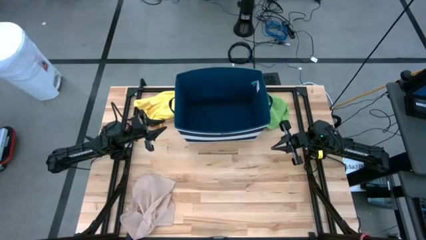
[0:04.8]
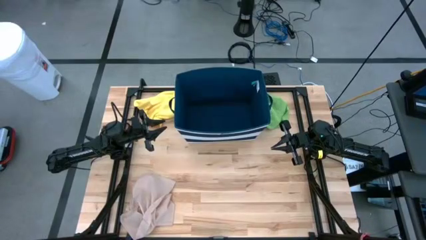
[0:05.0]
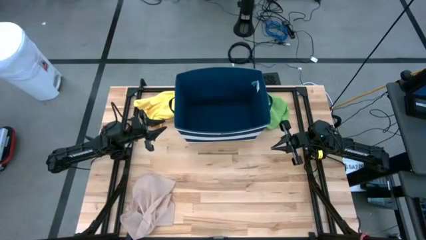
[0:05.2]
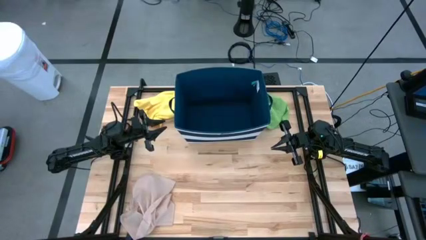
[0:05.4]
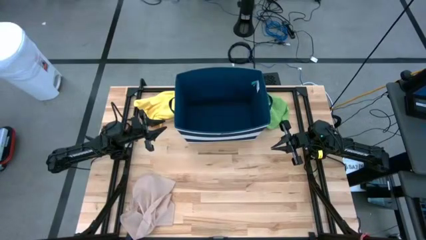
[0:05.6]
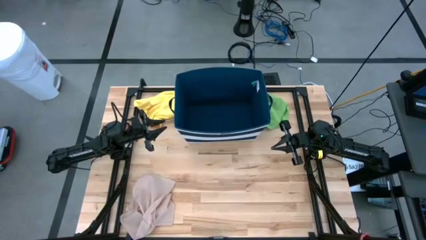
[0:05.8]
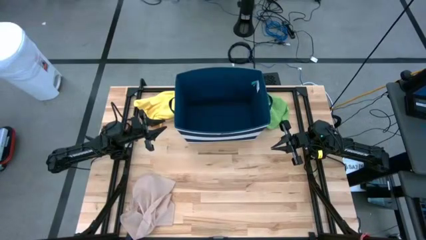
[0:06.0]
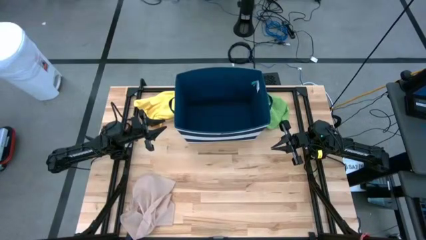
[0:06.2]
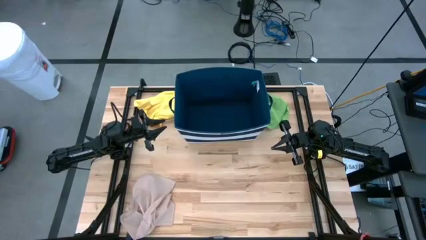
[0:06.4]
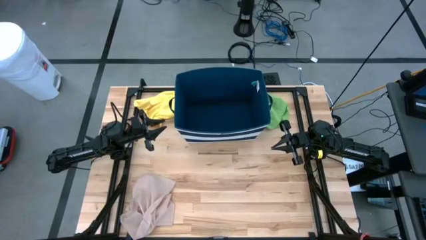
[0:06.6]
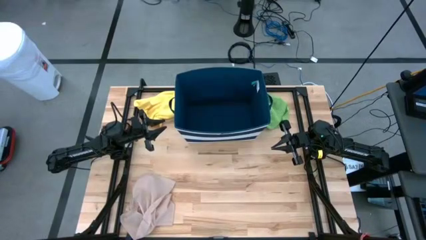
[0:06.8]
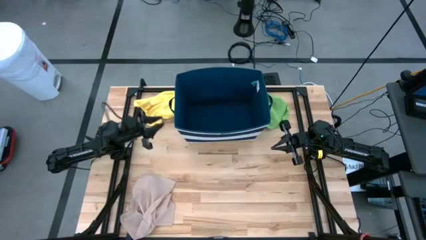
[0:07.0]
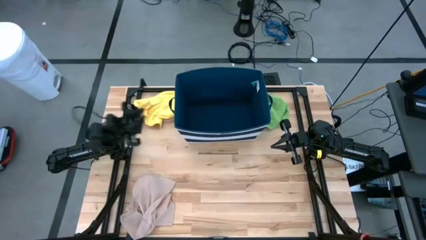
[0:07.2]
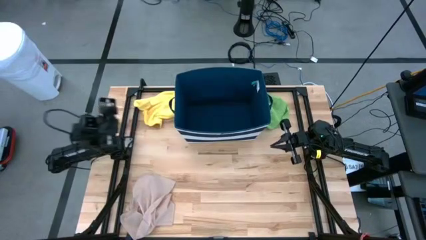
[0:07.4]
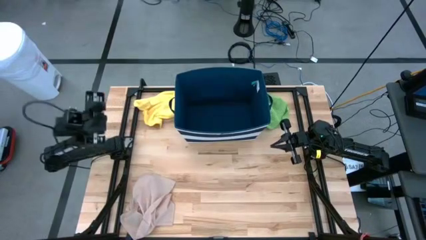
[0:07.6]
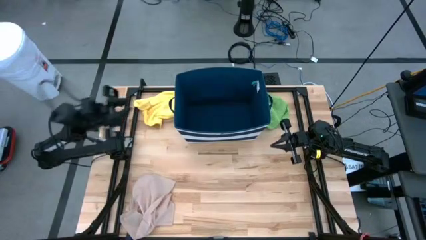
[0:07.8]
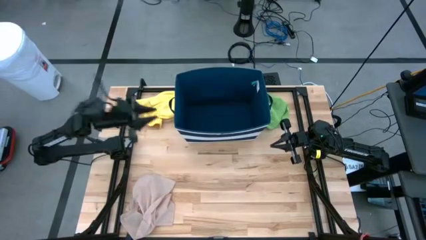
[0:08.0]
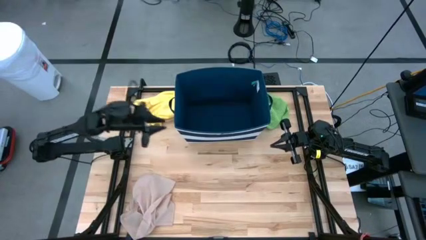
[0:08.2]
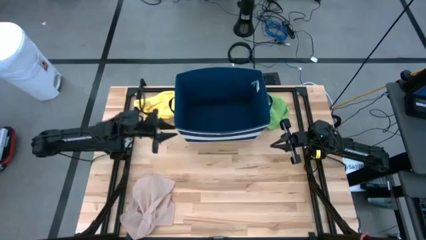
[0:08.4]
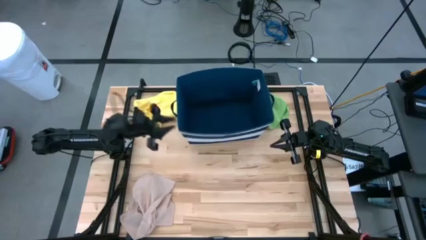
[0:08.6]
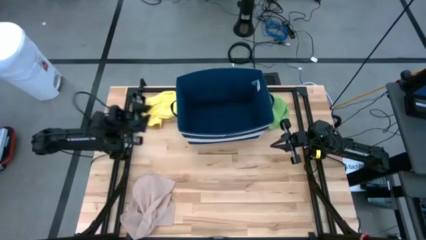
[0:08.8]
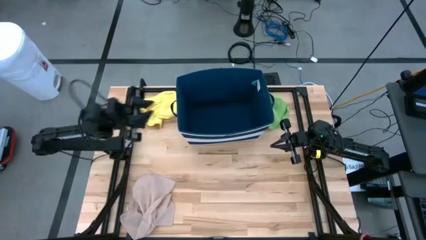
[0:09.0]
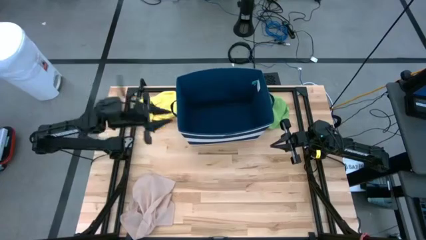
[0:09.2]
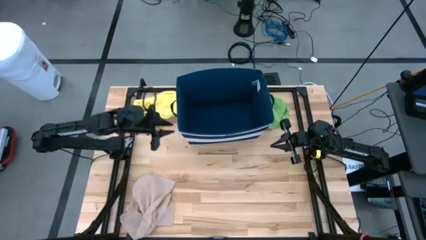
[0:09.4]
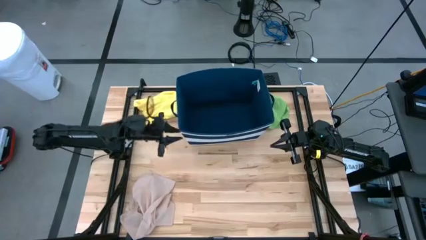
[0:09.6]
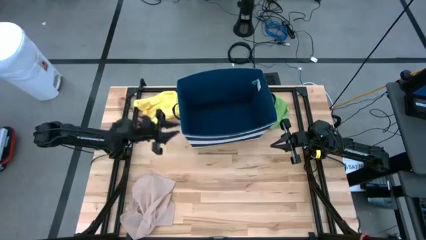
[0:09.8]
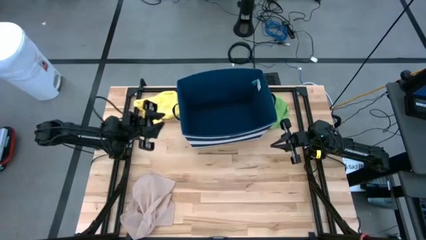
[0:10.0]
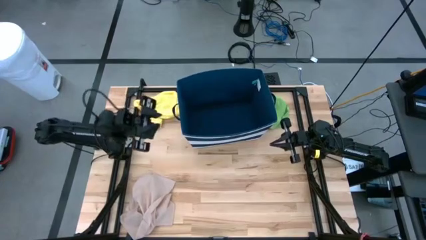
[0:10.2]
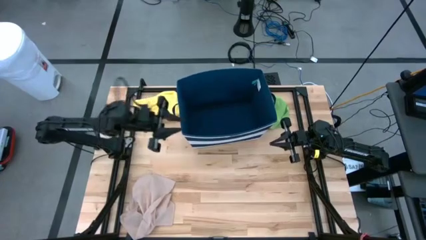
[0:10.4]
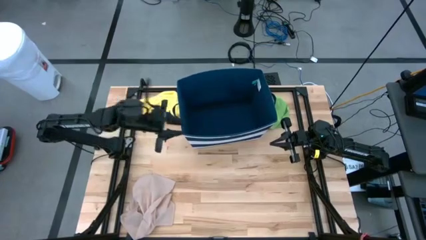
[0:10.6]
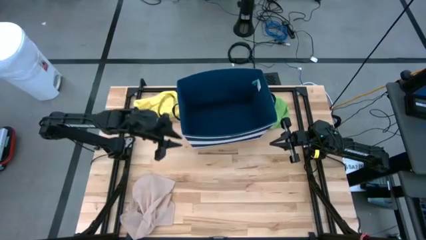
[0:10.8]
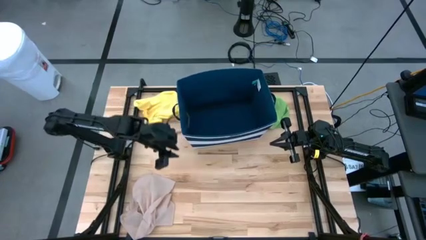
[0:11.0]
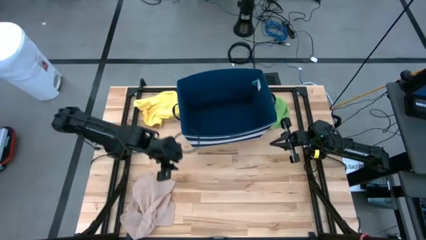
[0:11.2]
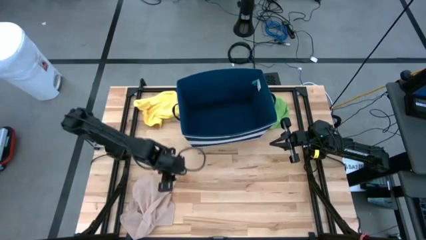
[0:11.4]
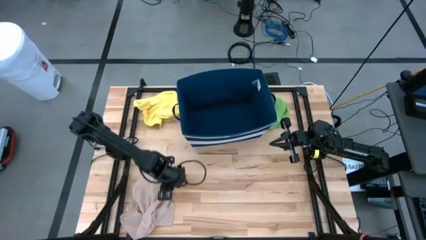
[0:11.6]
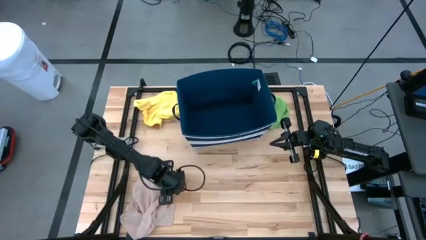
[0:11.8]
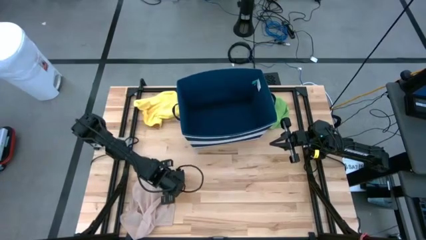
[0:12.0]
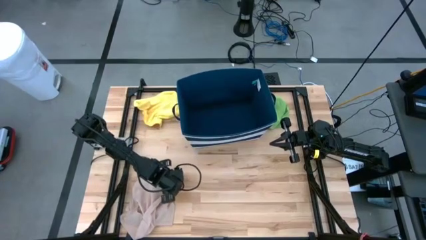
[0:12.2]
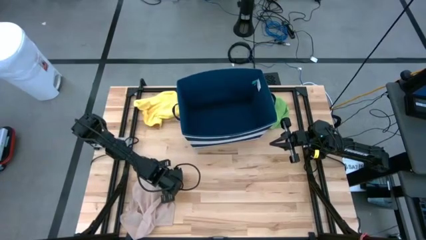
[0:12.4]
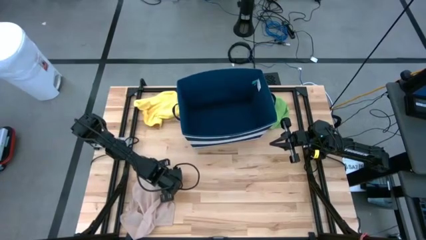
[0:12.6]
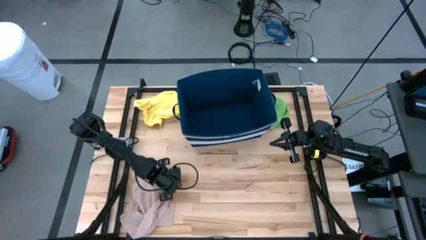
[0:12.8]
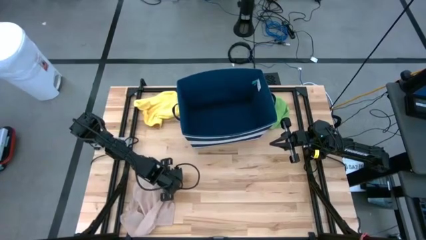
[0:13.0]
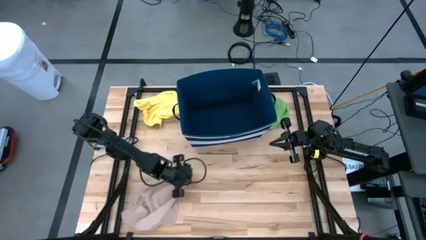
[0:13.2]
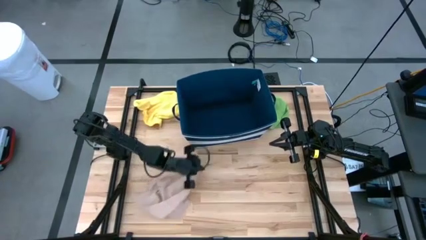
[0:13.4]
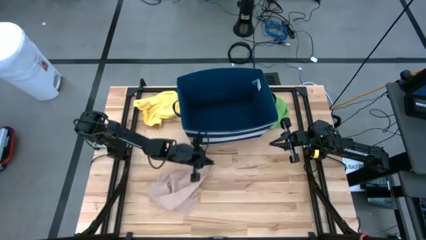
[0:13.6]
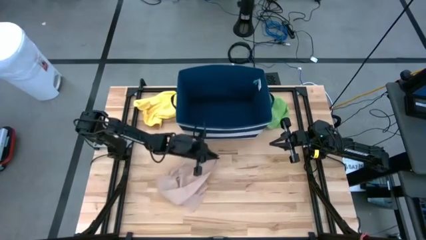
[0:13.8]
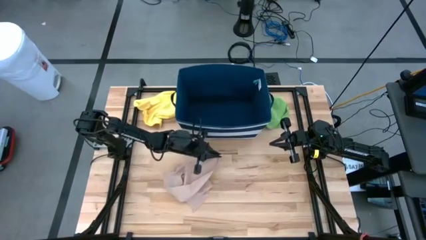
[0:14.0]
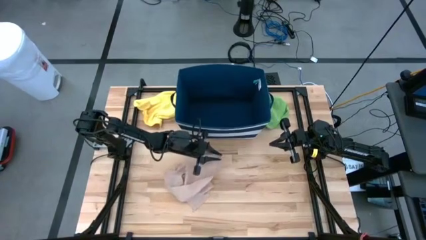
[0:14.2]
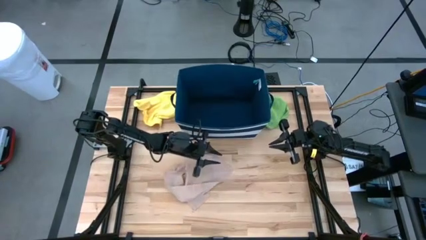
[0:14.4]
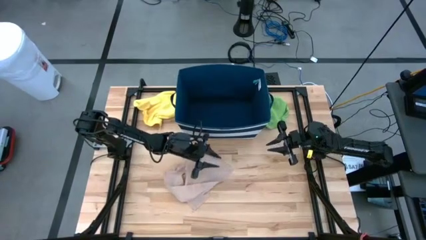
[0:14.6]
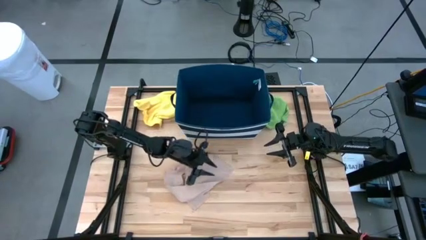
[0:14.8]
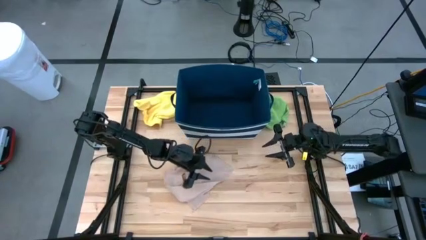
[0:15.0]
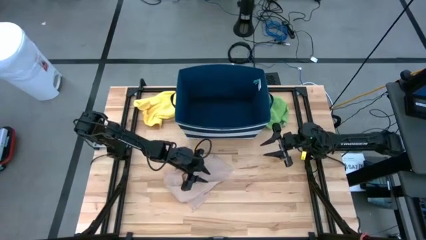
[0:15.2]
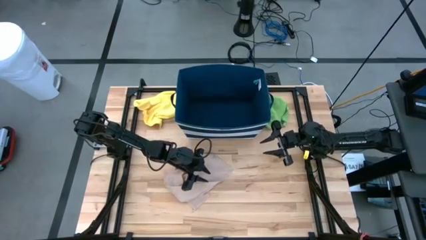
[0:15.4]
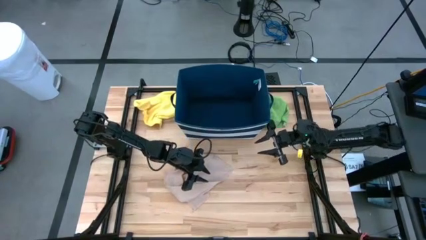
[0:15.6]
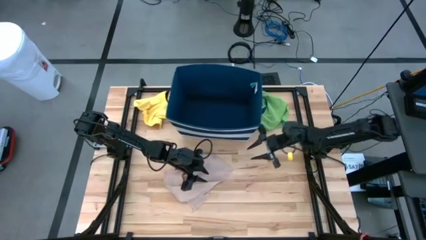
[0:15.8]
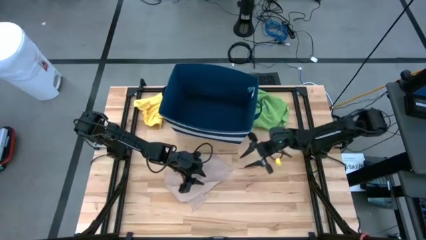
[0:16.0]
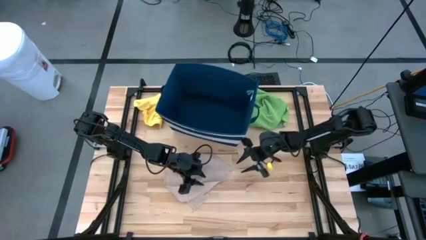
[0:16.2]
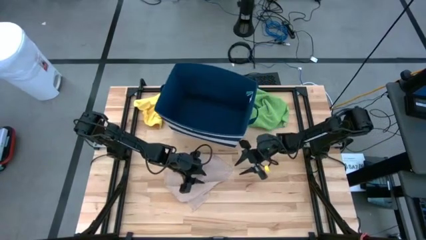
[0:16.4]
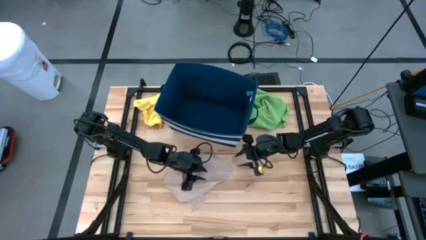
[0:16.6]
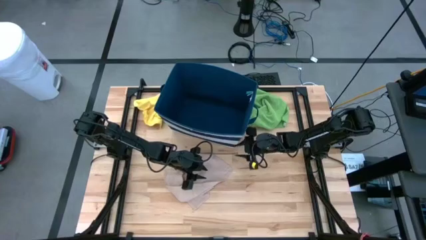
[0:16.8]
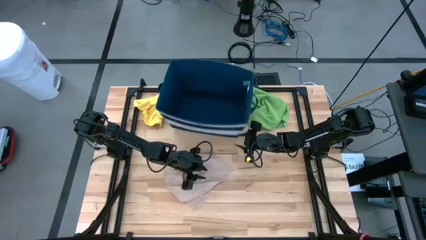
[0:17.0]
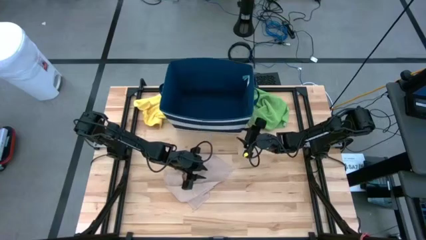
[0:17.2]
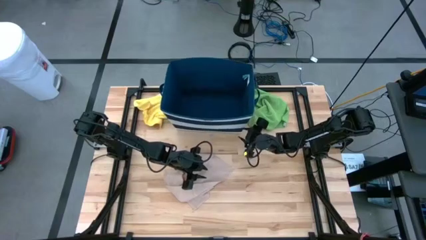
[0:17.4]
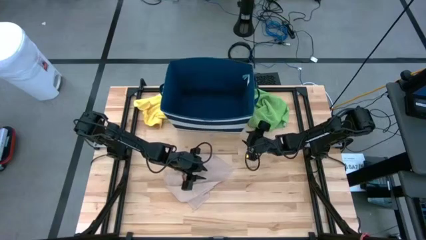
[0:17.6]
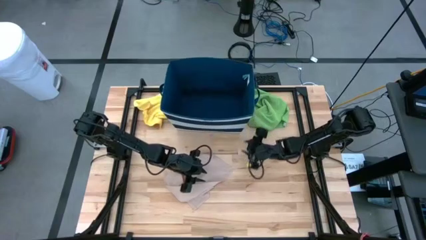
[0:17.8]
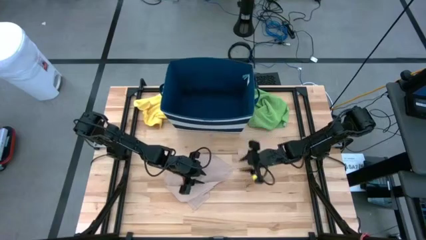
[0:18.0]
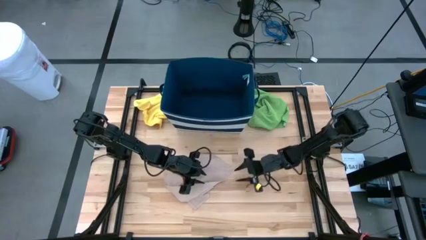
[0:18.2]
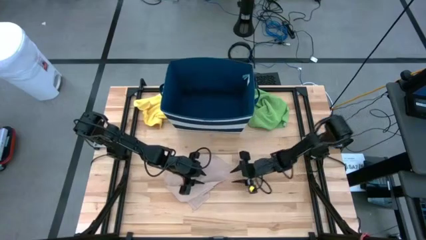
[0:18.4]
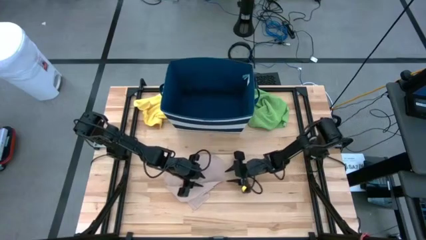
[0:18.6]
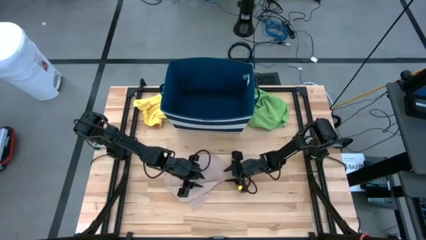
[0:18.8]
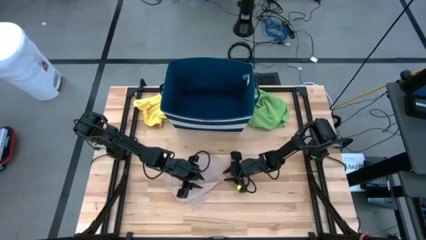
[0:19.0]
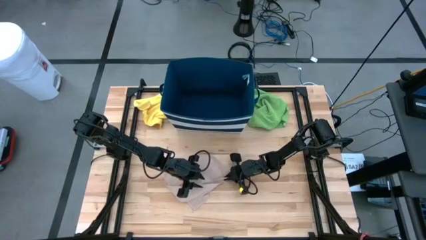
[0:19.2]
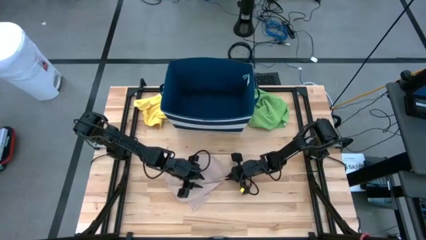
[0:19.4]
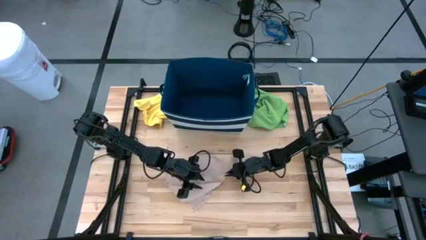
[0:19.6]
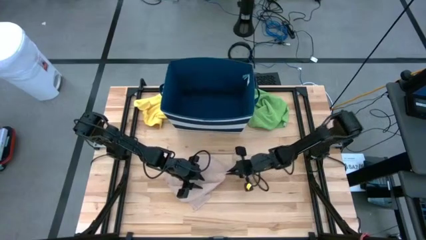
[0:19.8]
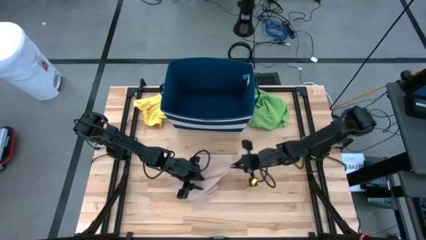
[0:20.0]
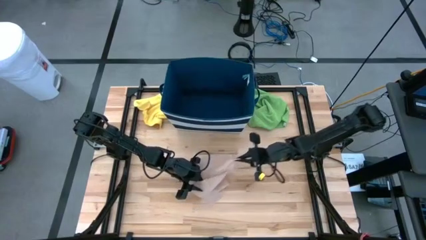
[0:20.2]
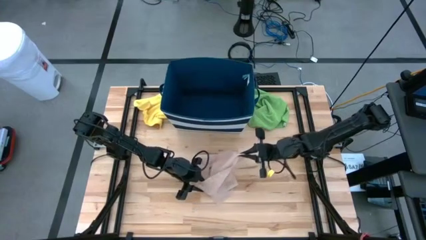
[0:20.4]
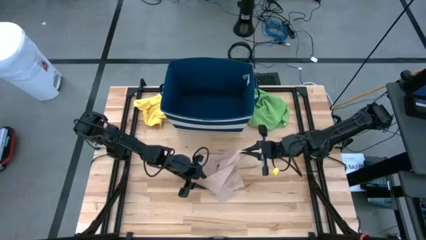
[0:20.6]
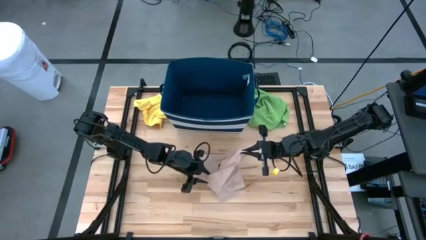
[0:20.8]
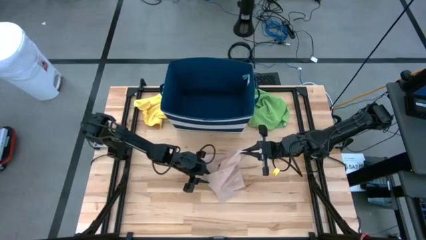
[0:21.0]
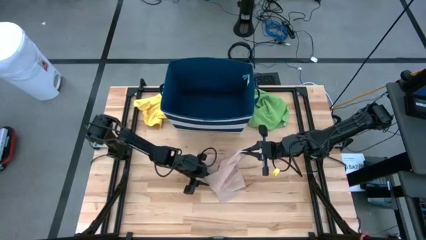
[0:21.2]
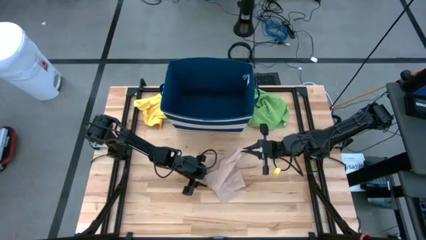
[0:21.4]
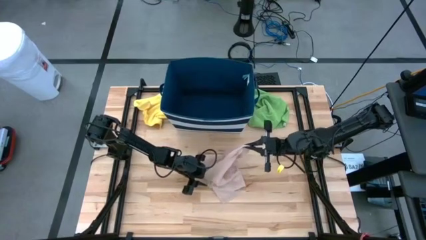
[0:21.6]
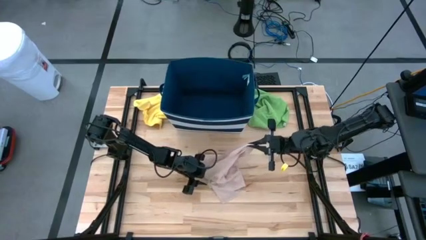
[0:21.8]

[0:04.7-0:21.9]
Task: Fold towel
Fold the brown towel
